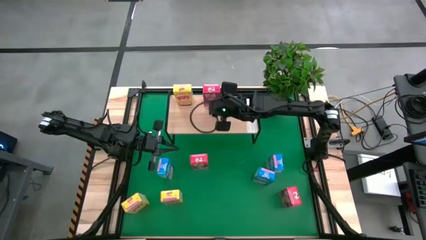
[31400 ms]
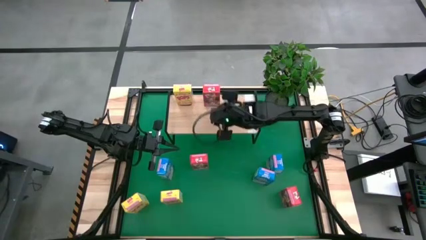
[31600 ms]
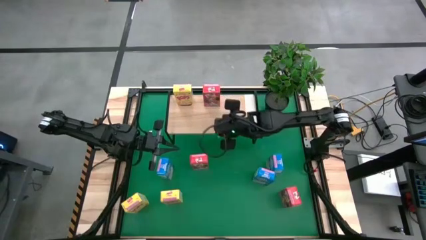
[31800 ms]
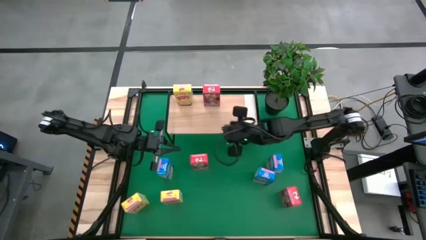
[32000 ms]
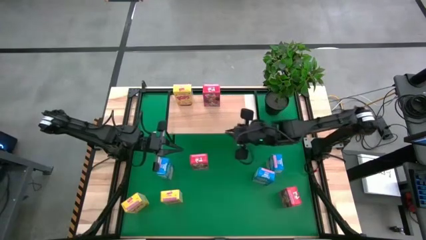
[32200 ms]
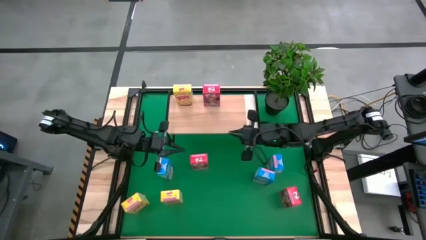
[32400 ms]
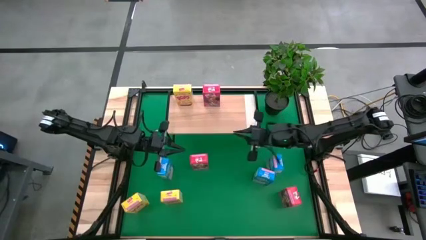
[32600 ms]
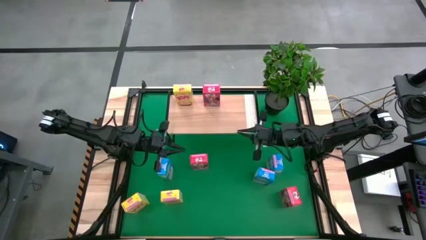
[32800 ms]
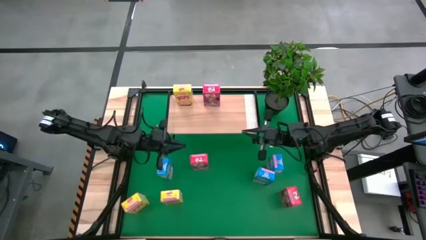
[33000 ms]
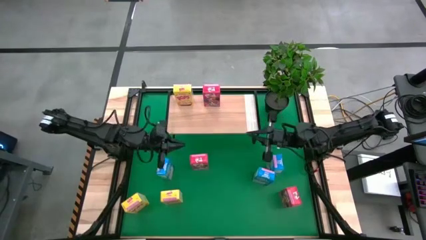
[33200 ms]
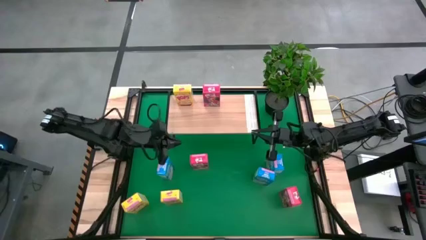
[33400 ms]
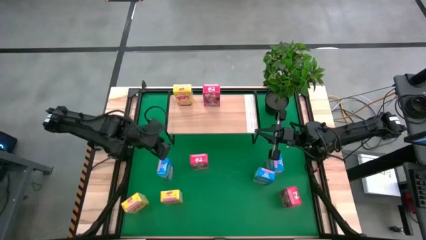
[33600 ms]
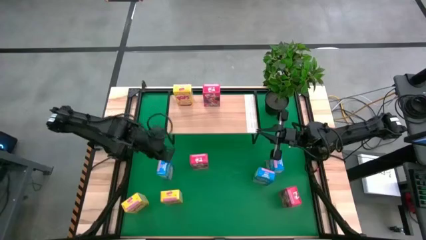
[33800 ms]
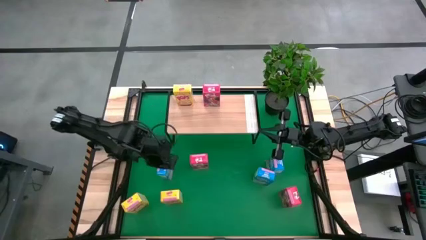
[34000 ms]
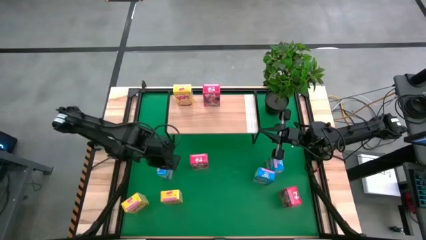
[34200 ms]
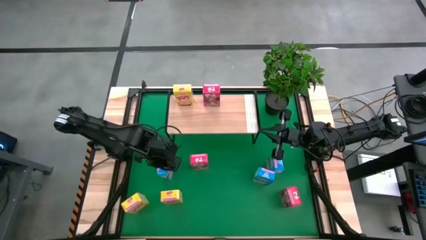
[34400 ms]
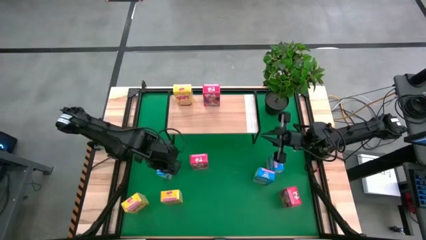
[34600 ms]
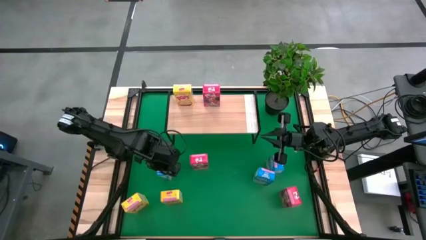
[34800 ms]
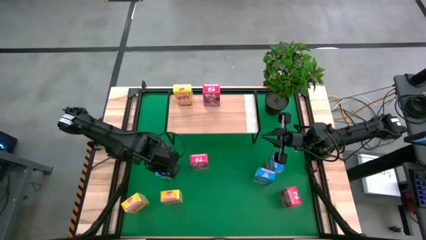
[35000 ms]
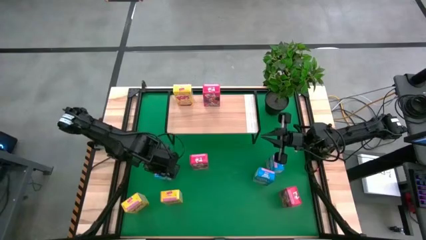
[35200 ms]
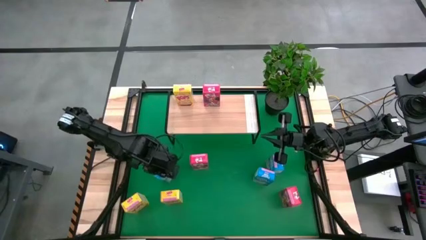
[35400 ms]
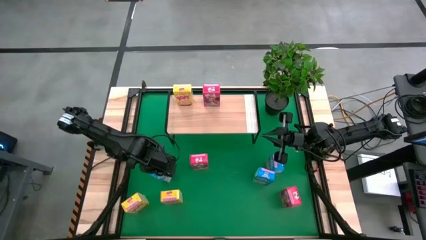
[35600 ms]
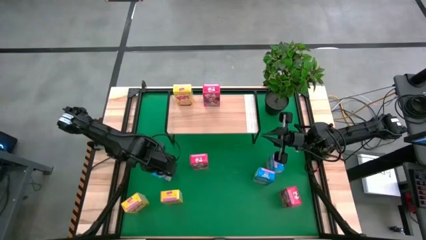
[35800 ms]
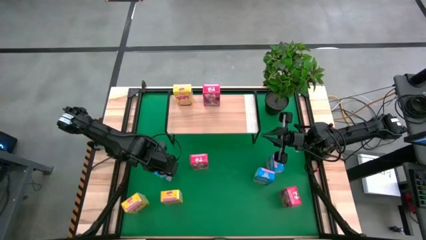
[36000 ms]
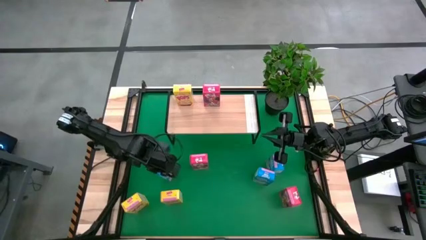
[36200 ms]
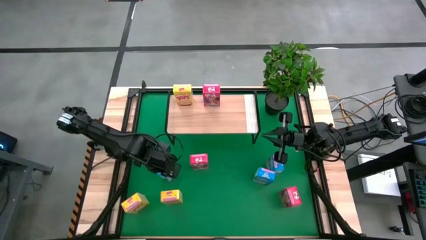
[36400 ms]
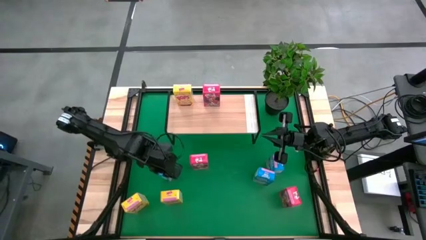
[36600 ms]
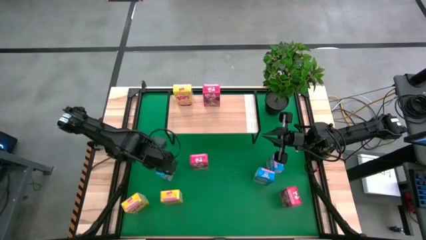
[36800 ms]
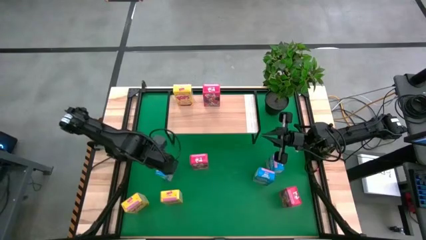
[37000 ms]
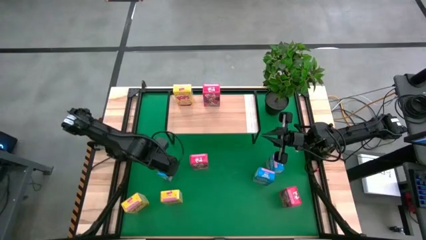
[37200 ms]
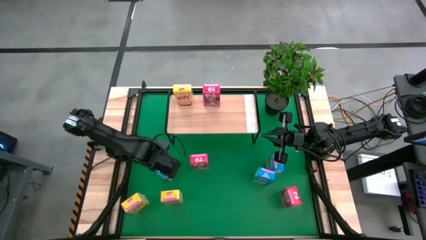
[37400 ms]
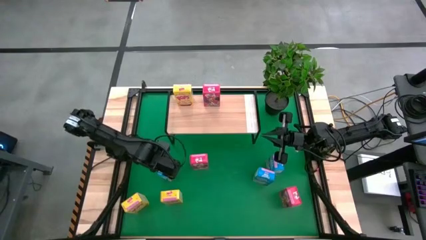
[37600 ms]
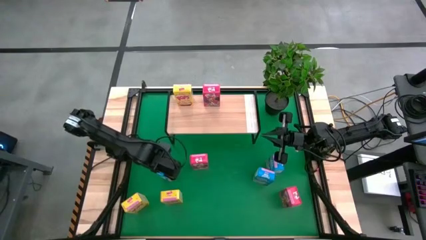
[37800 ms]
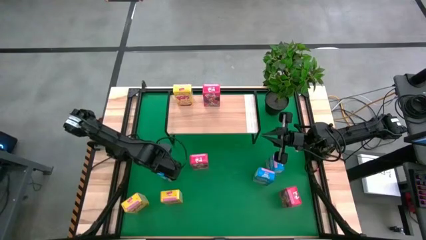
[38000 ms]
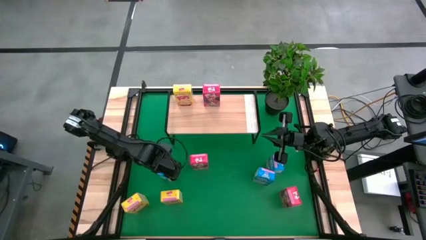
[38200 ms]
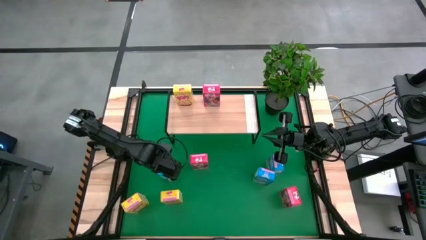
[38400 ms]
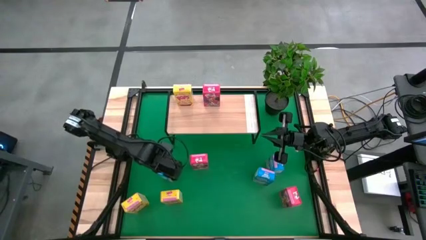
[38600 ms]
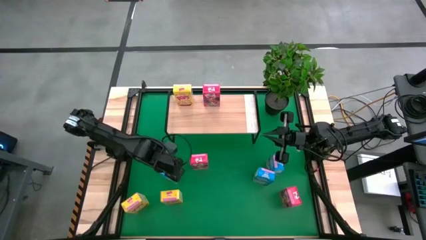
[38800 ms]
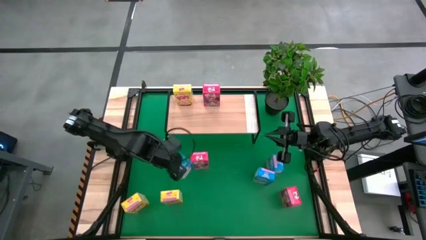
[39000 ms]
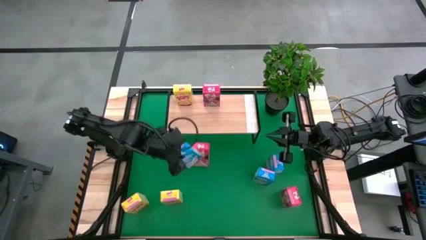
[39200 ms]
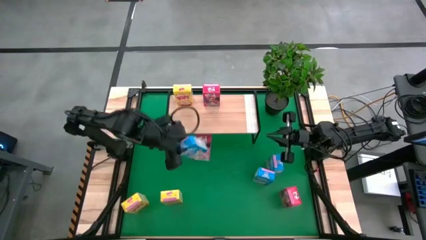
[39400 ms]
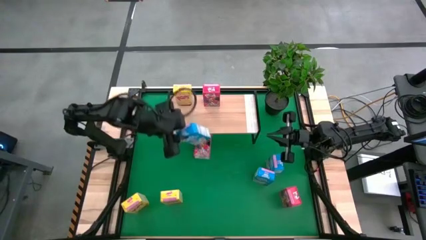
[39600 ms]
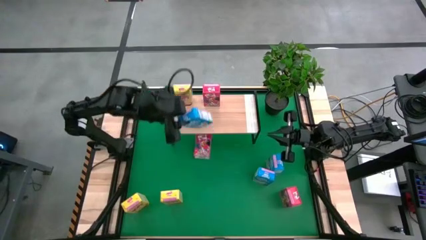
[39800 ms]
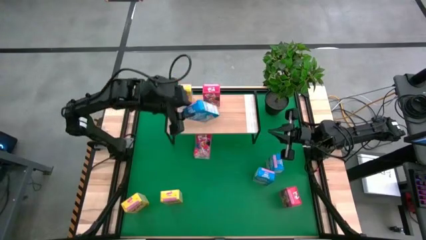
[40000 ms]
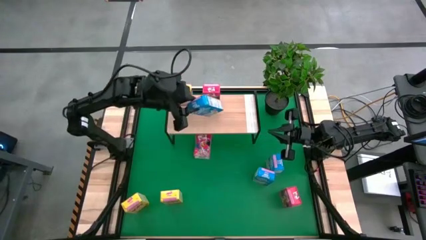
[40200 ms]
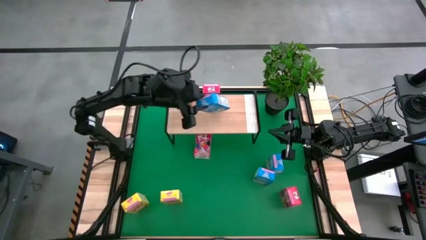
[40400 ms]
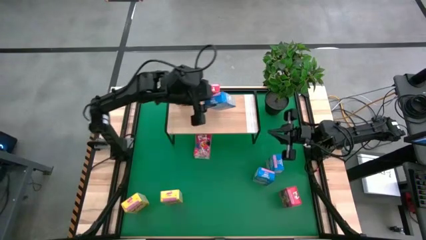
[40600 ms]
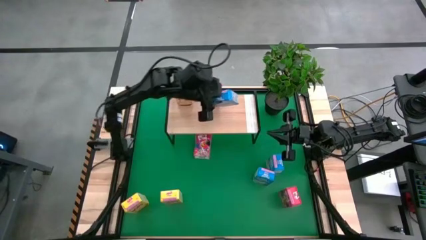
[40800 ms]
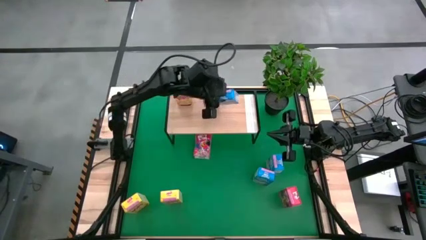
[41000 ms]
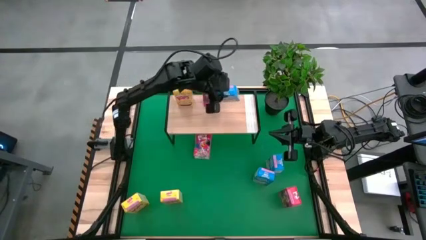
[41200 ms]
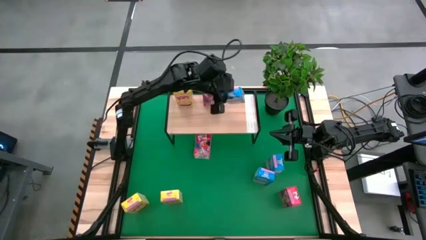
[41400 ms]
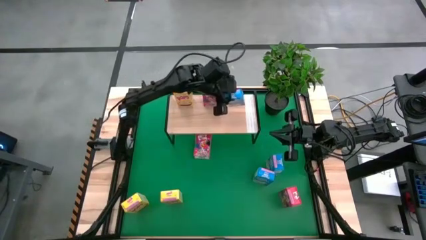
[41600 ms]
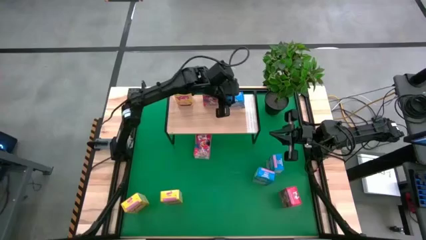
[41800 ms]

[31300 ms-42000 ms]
Task: Stack cereal on shelf
Put the top left blue cereal box on the shelf

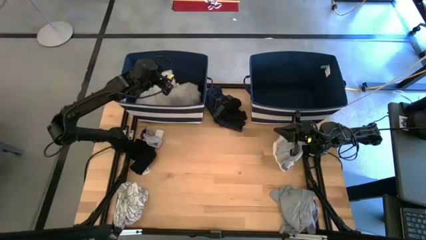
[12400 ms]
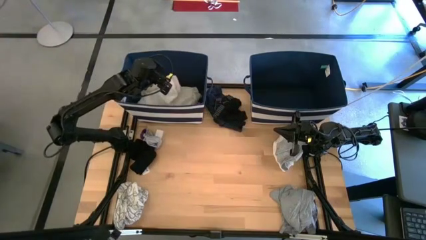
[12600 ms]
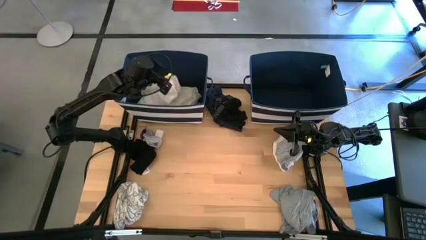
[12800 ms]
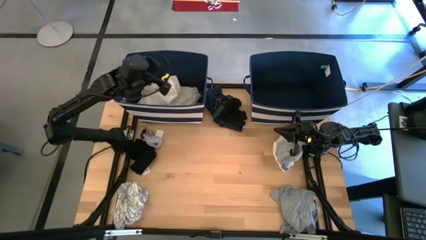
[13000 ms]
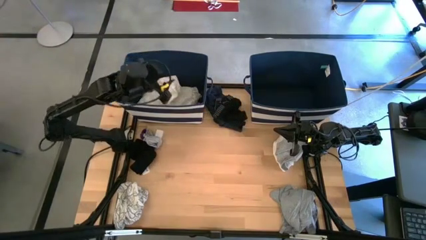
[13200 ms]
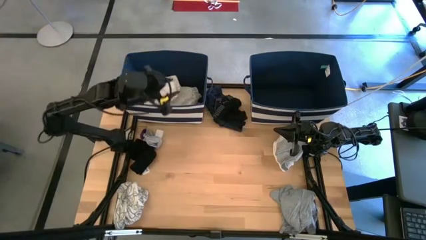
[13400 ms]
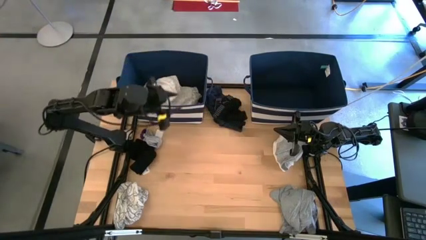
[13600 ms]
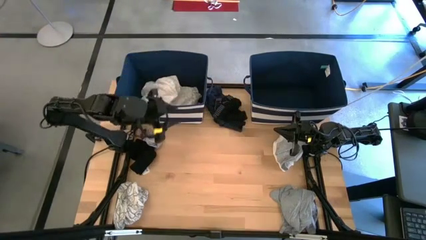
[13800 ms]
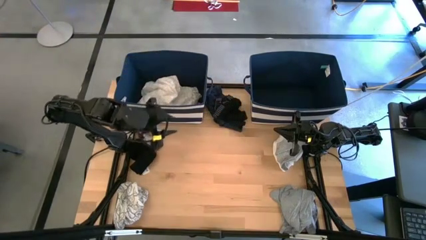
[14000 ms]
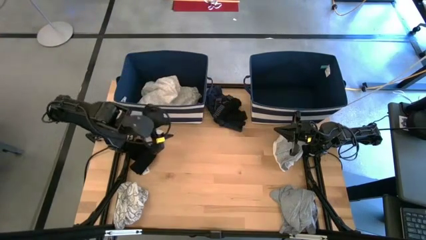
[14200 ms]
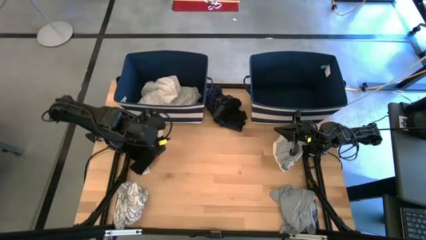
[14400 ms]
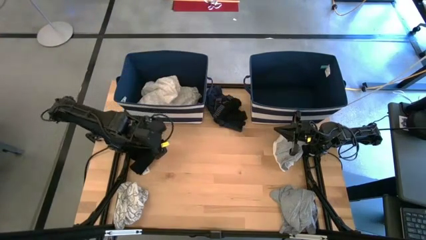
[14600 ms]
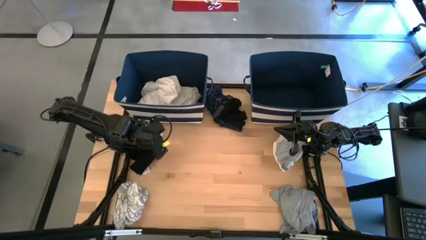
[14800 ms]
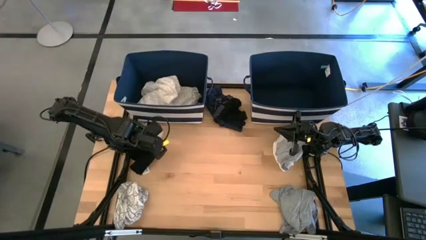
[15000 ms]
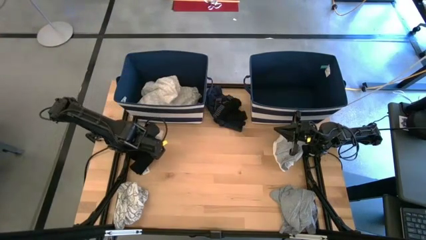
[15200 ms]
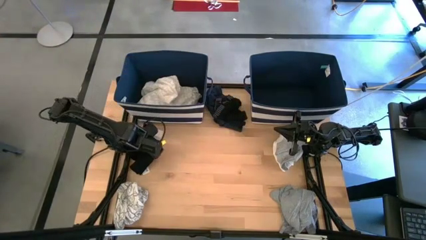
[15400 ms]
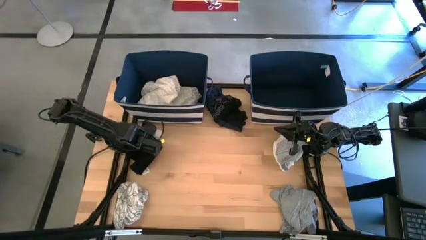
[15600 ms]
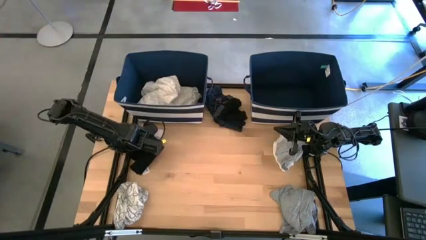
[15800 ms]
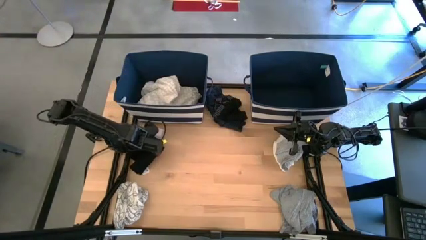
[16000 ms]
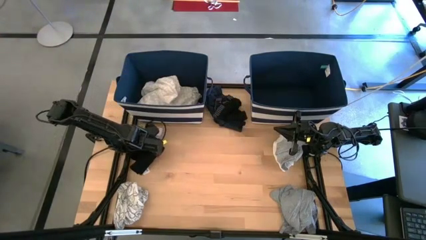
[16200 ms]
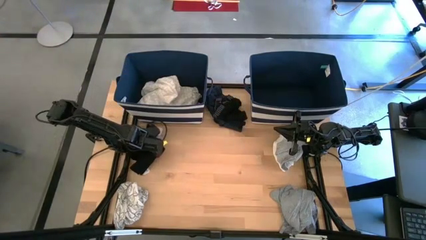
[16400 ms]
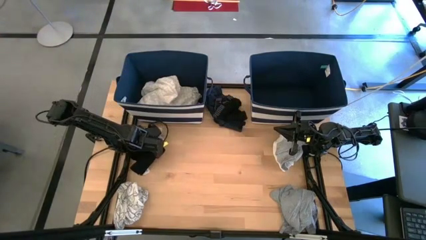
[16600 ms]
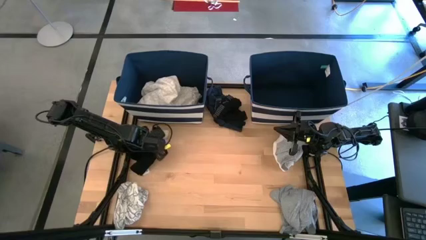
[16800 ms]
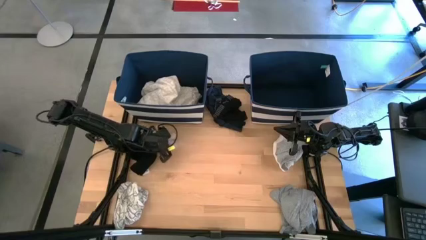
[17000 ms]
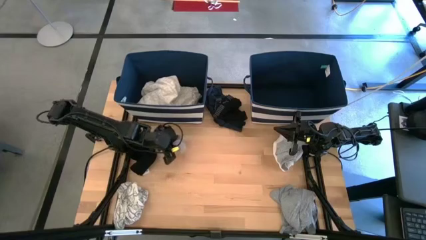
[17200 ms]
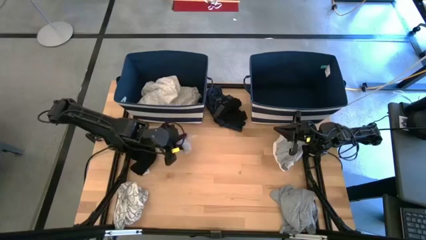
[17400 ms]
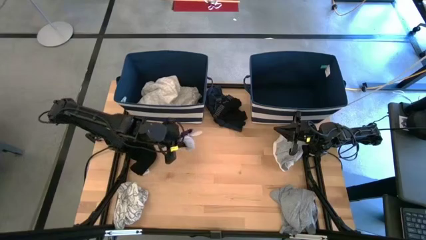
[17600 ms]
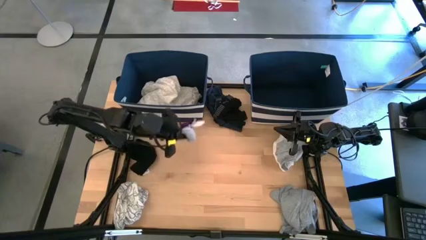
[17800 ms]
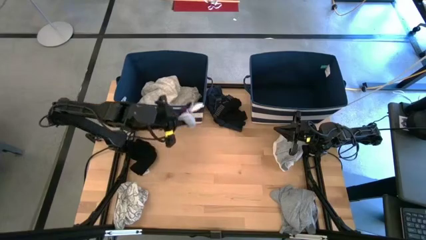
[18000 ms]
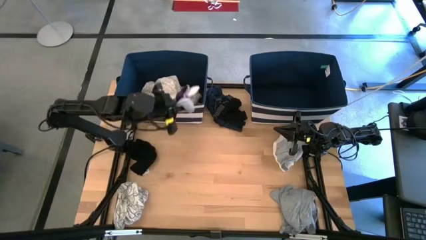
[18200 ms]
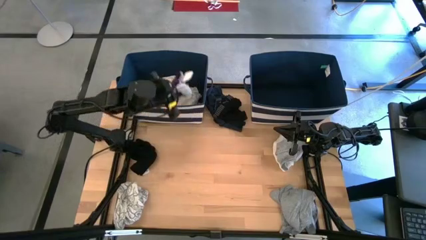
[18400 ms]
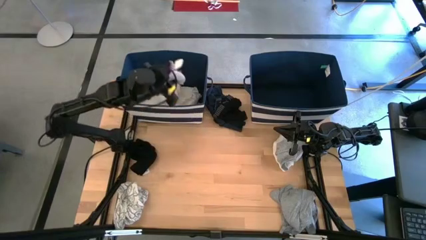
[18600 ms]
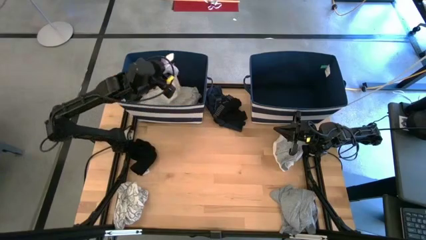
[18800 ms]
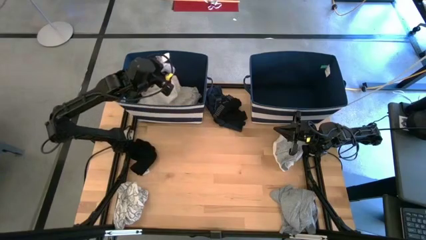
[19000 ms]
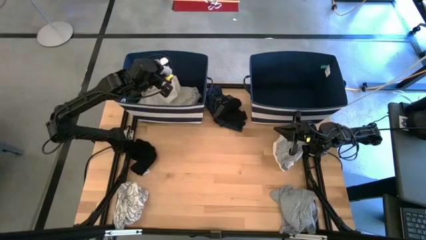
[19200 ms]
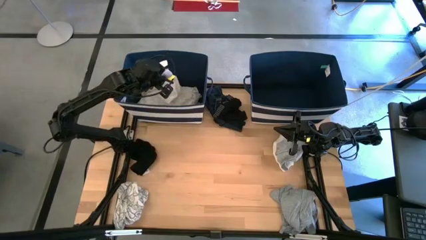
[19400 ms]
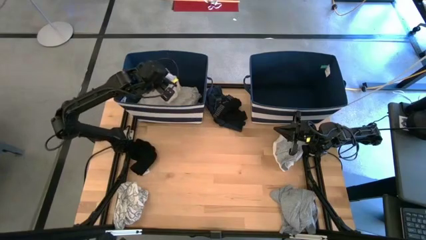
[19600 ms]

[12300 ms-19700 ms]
Task: Sort clothes
Put the gray socks into the left blue bin
